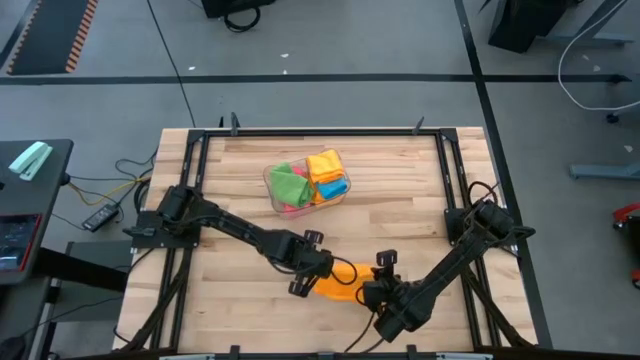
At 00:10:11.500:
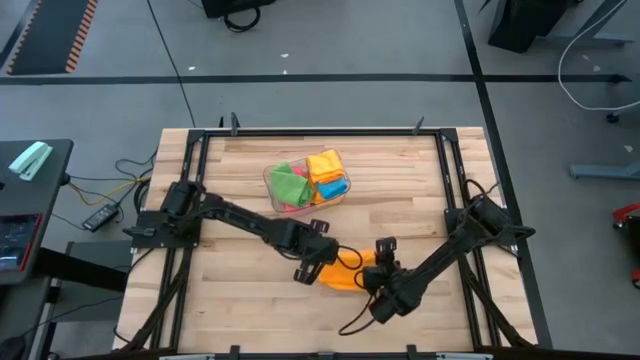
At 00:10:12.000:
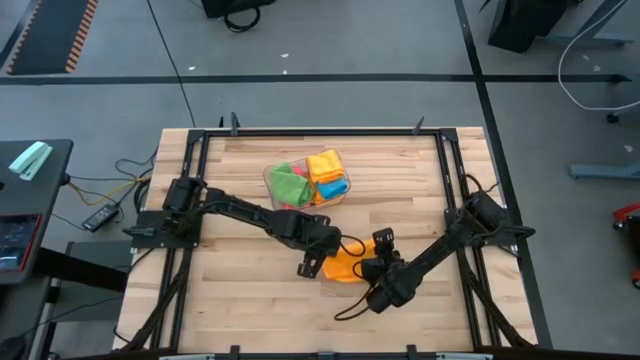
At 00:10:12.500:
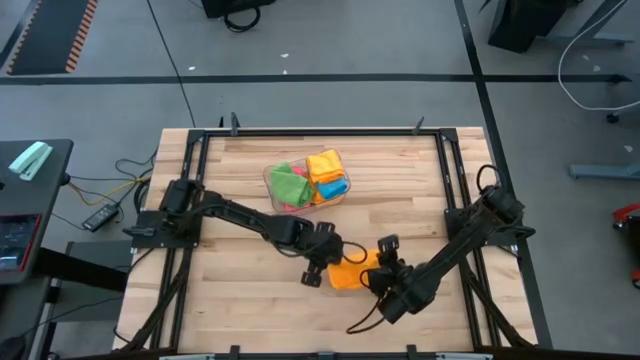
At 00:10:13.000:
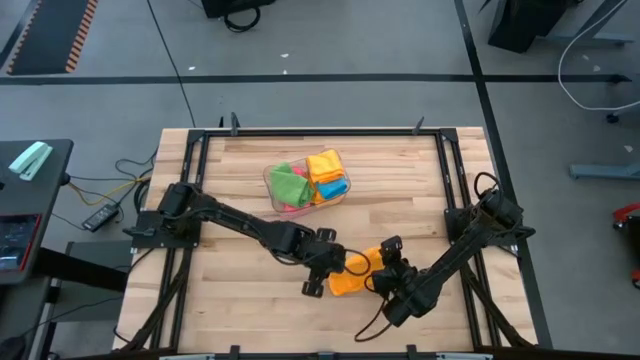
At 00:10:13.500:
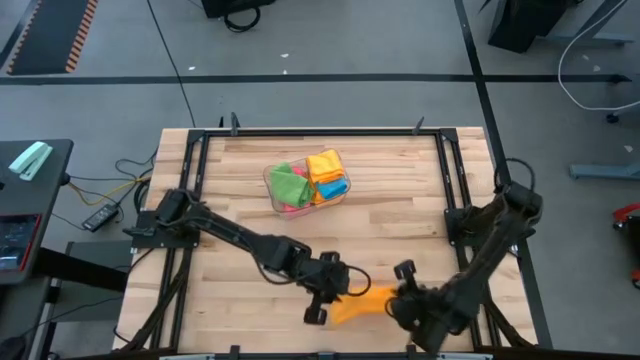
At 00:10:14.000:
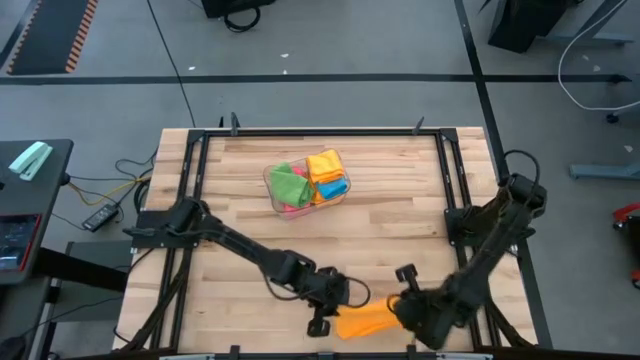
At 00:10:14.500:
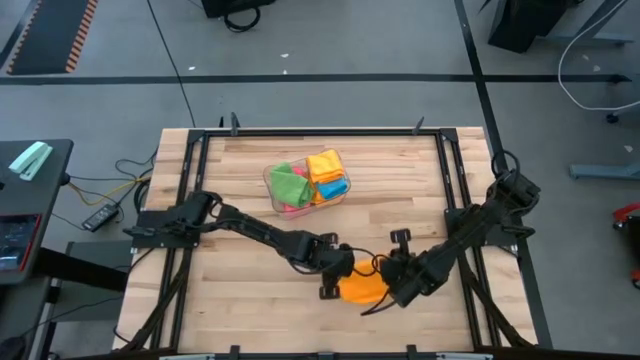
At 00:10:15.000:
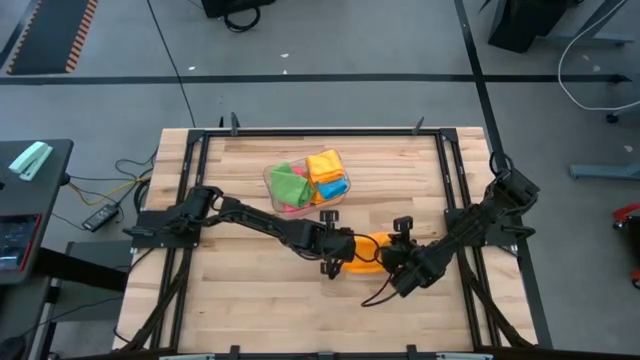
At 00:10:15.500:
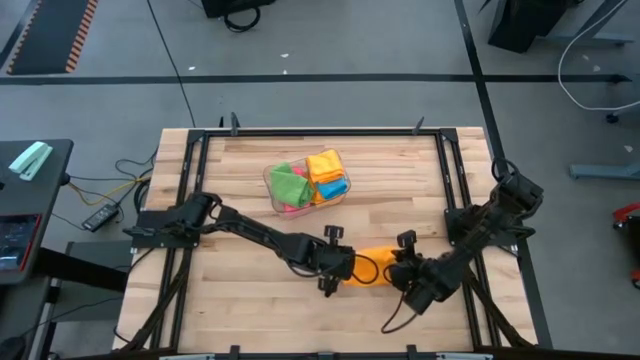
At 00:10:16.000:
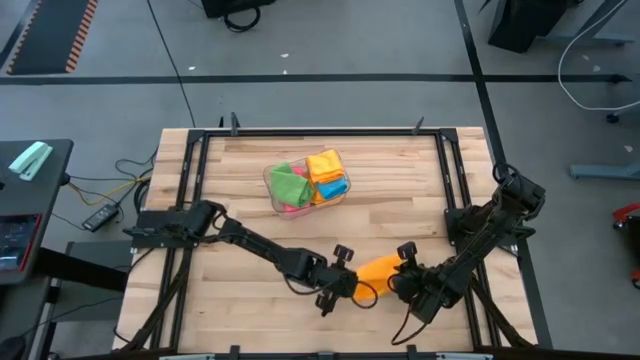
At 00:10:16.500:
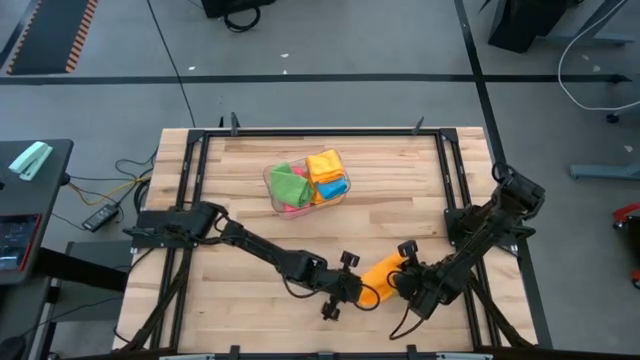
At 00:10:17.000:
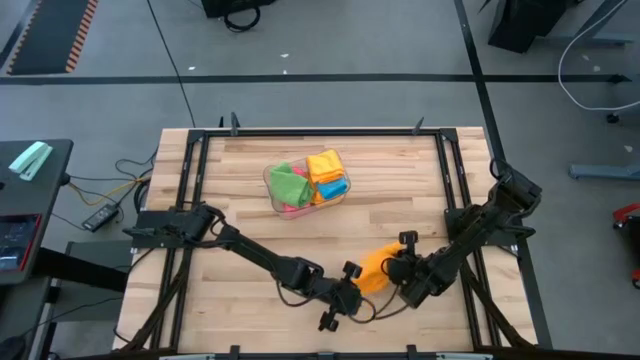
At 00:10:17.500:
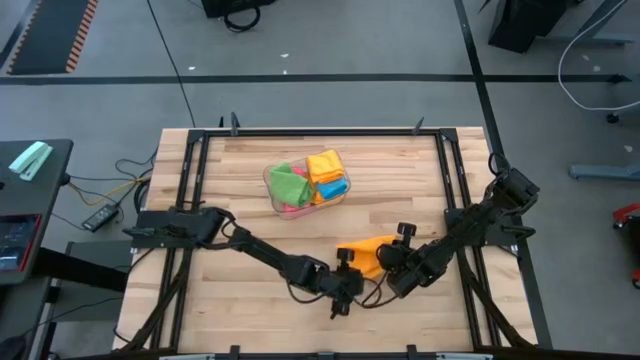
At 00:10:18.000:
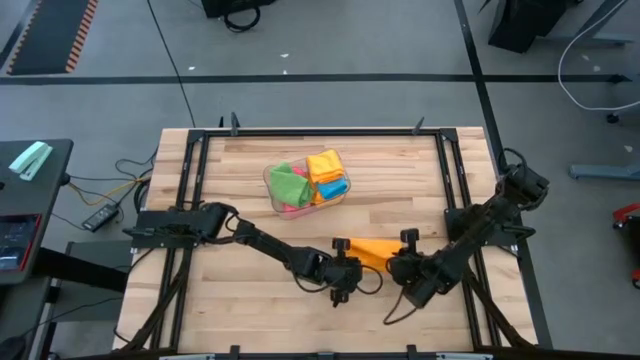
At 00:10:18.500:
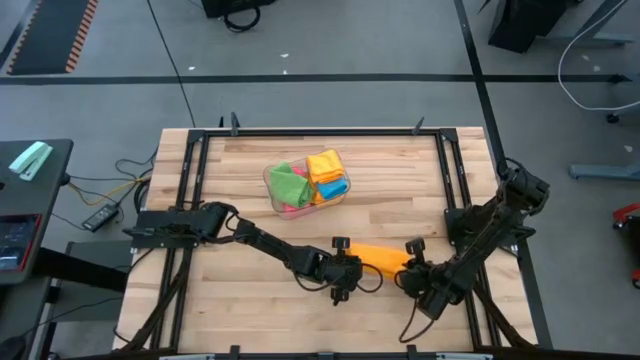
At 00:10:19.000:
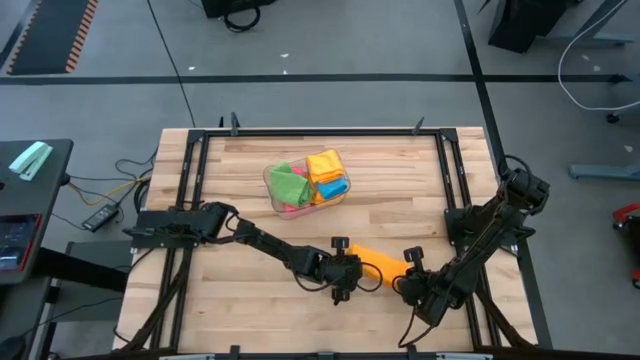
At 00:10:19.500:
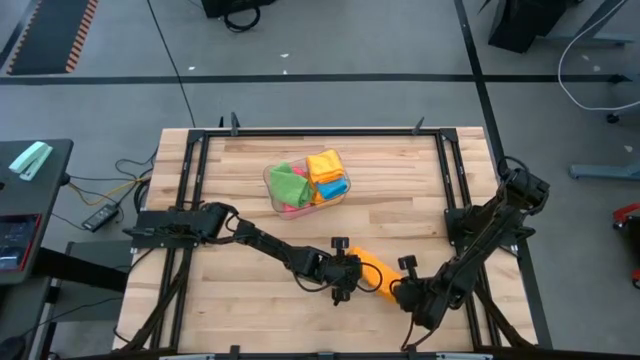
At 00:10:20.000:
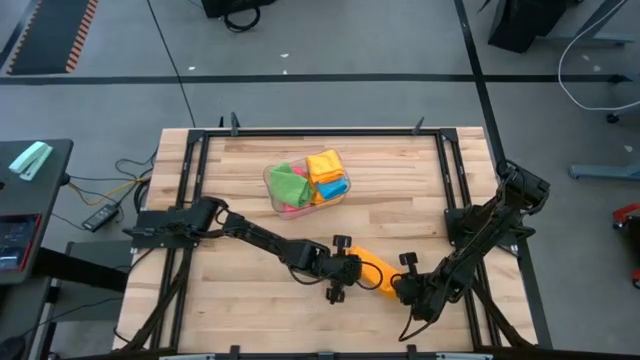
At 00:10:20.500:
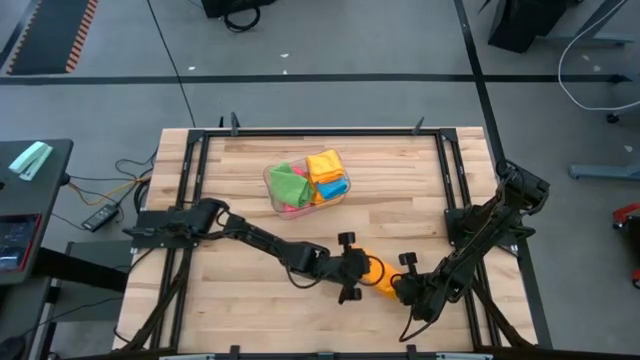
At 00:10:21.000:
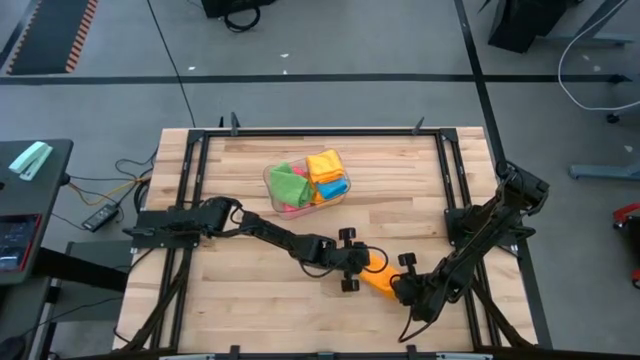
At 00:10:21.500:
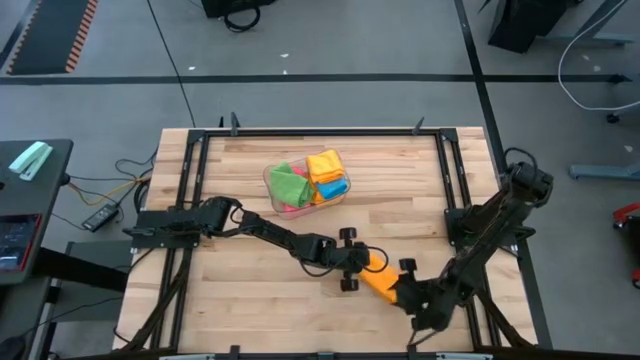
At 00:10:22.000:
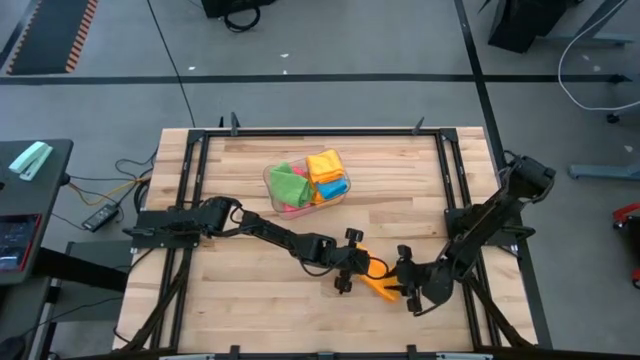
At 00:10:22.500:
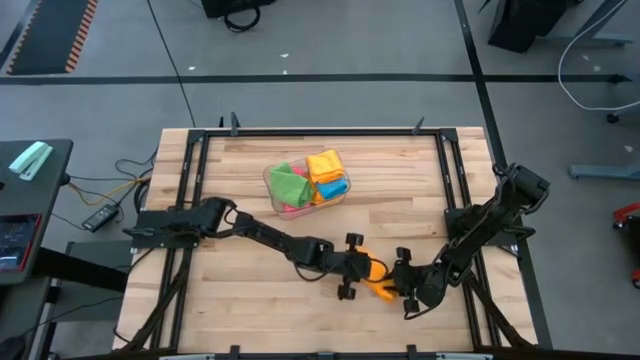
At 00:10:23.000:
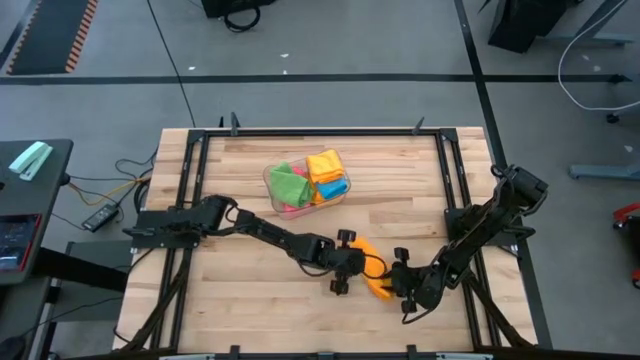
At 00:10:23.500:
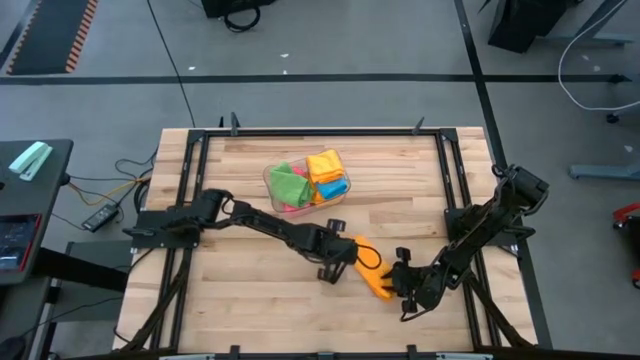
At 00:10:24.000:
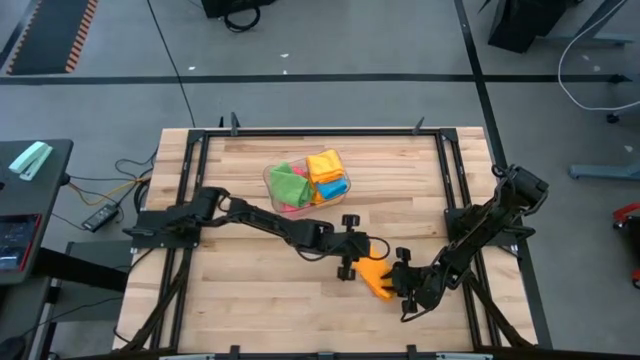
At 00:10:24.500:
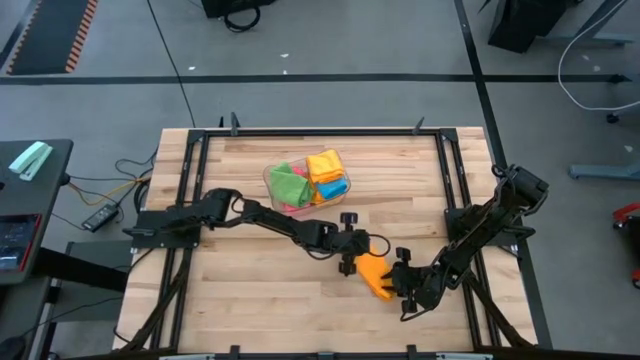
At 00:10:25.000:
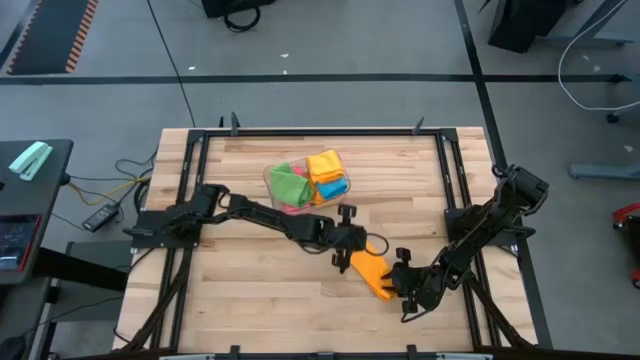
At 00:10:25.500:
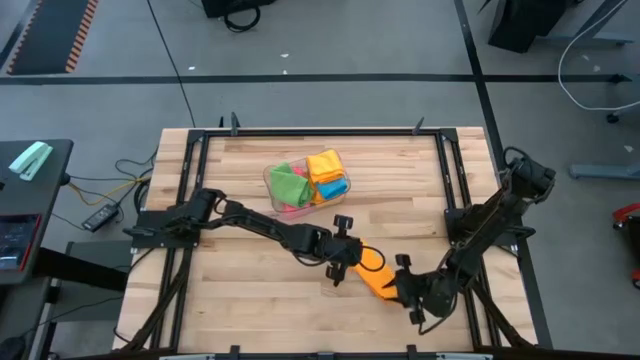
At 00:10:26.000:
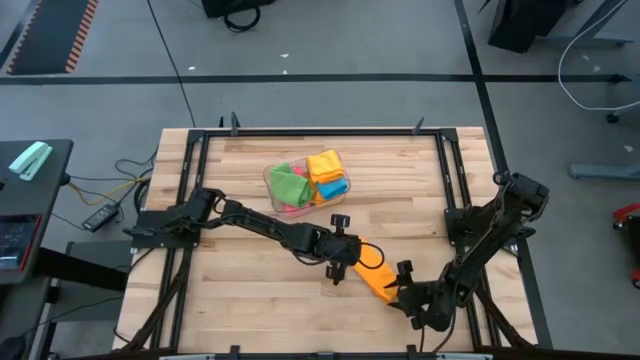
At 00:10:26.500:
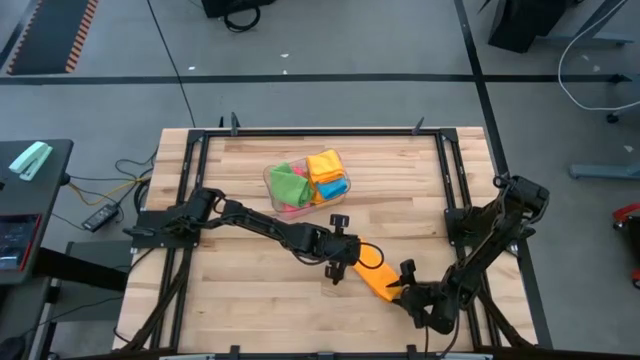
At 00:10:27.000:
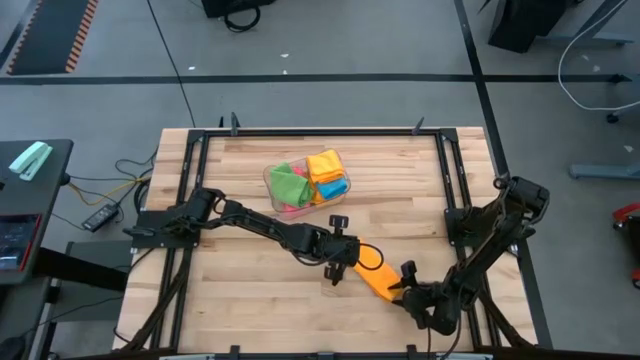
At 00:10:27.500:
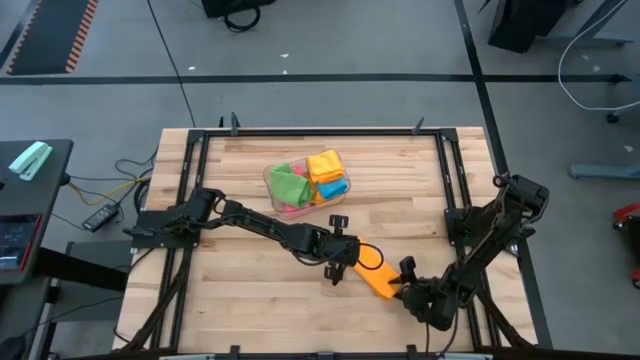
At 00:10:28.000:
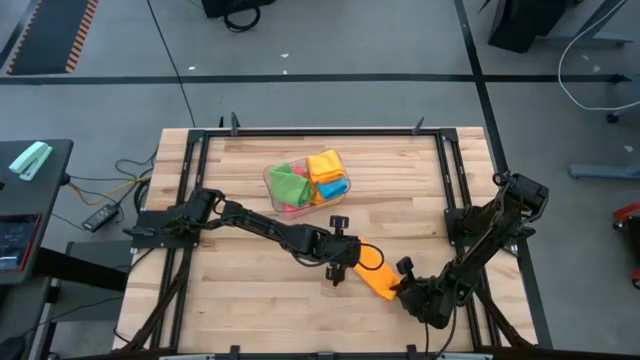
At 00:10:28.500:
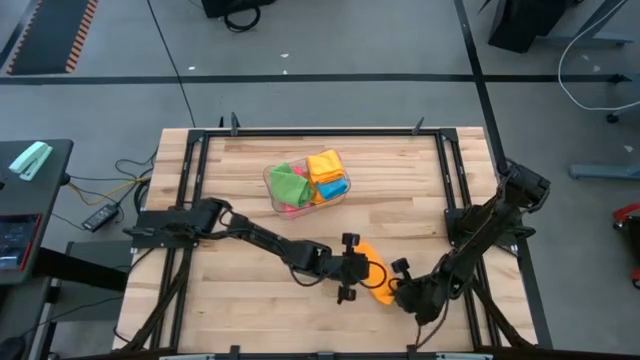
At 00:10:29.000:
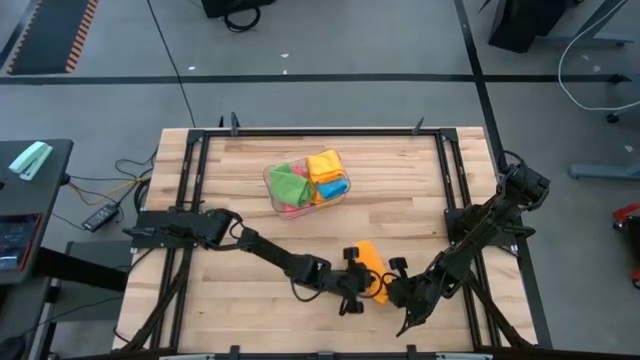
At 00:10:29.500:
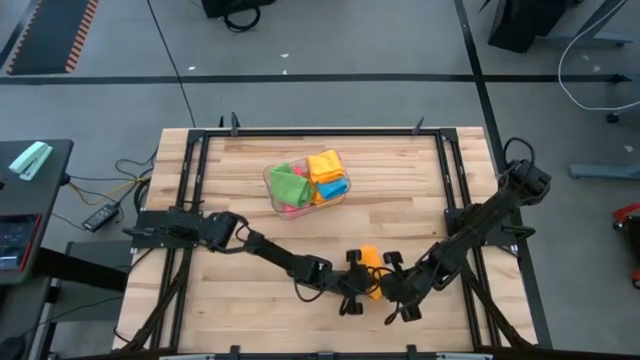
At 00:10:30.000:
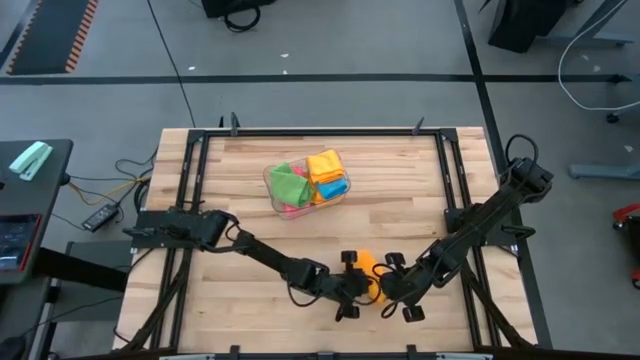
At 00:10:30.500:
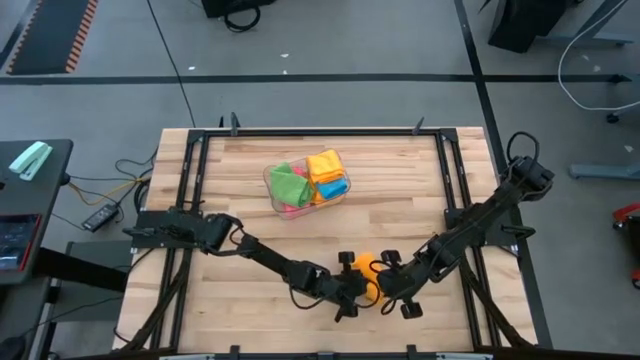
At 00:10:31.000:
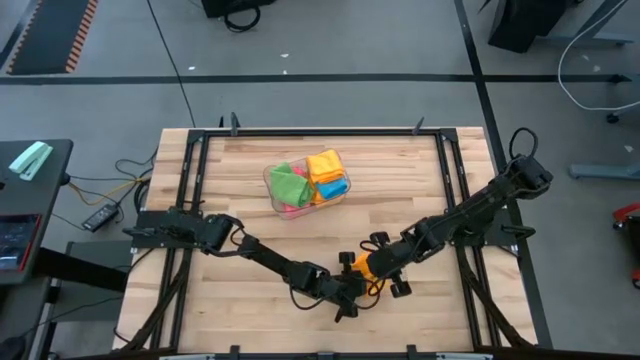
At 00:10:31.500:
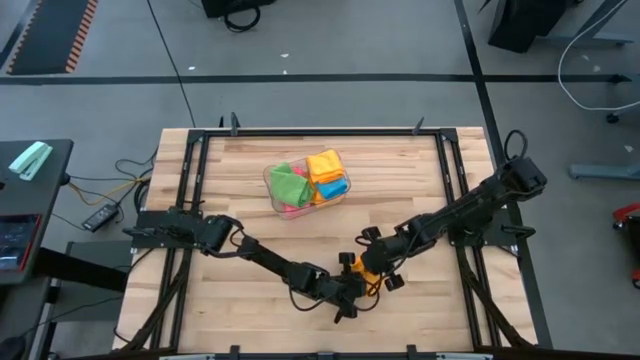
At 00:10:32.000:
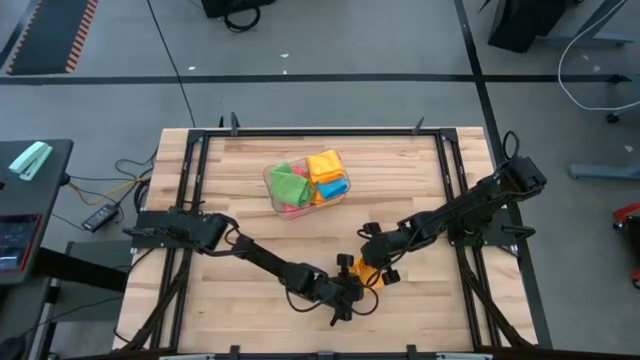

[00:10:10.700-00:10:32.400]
Task: Fold microfiber towels
Fold the orange microfiber cloth
